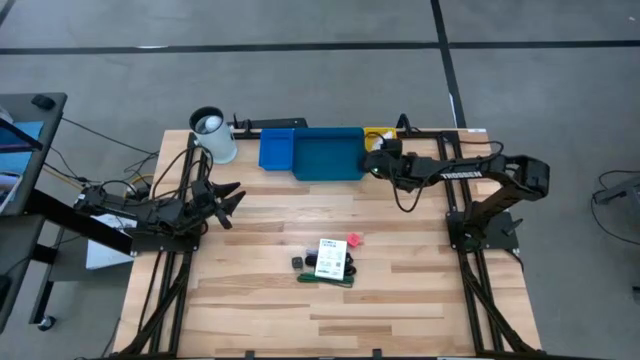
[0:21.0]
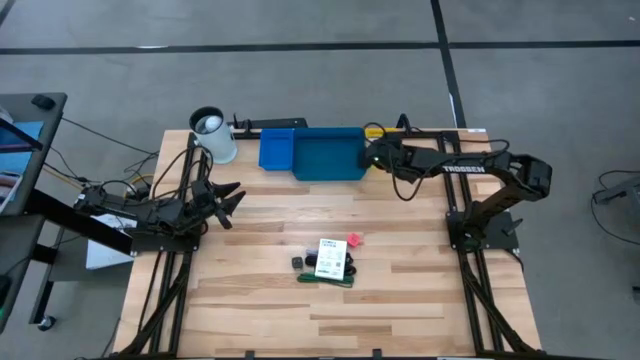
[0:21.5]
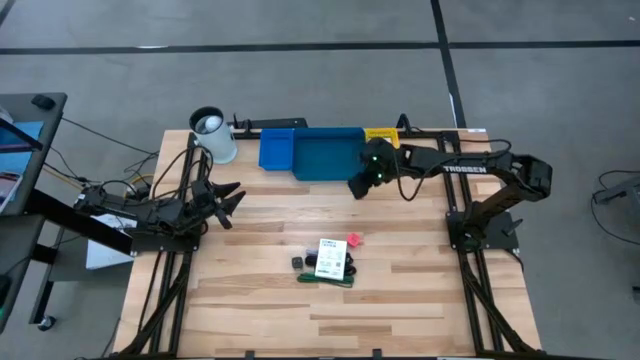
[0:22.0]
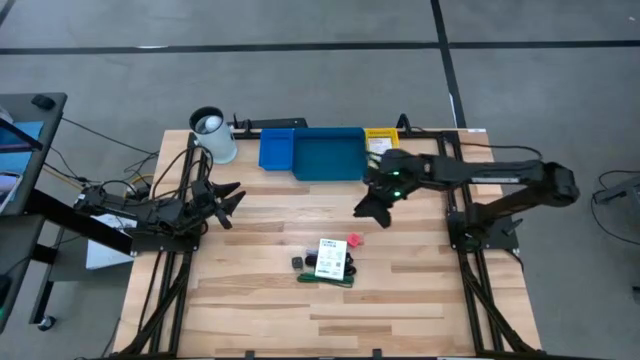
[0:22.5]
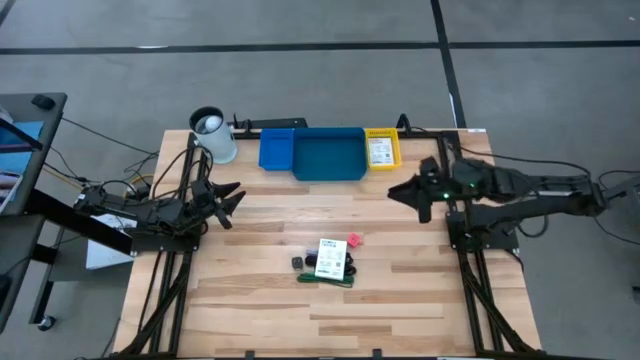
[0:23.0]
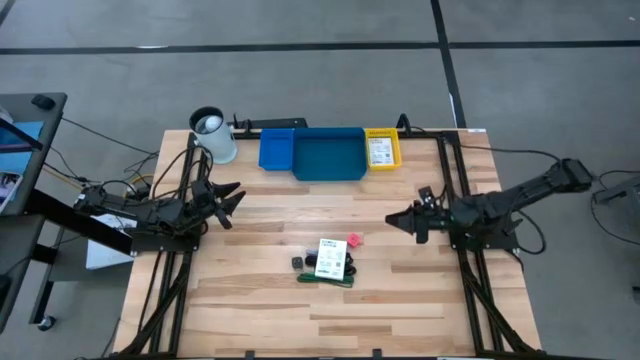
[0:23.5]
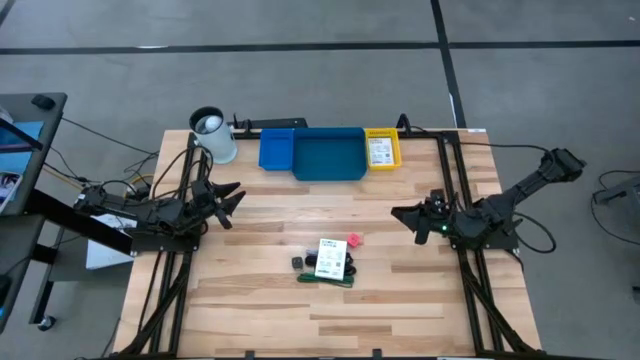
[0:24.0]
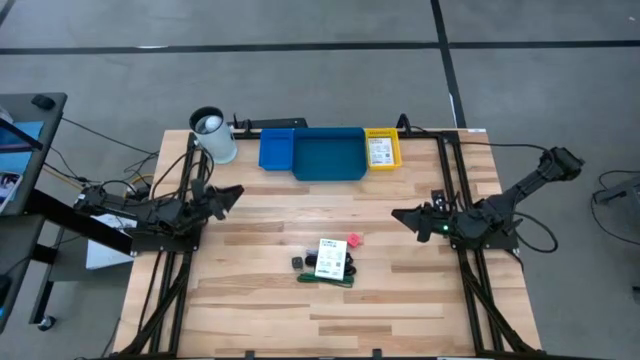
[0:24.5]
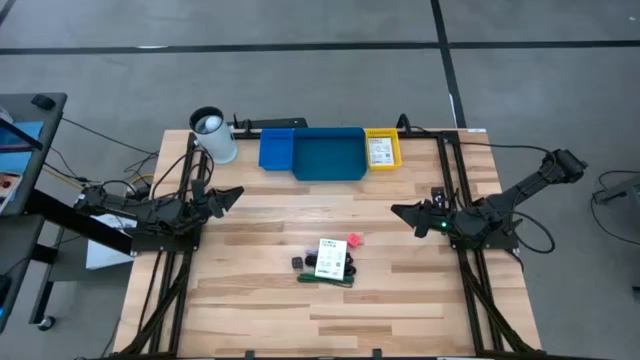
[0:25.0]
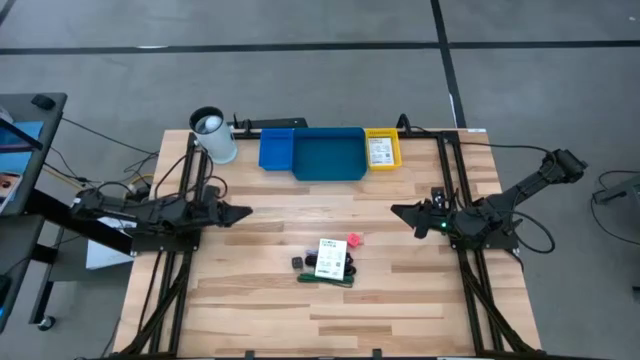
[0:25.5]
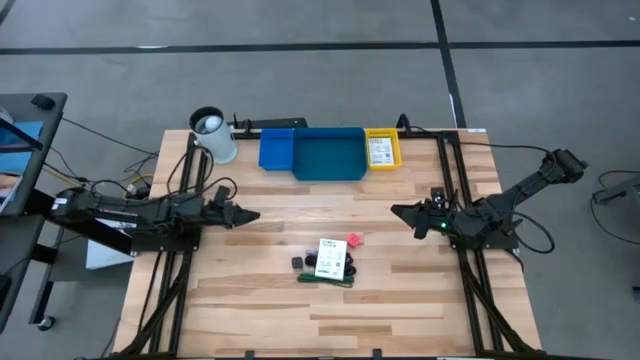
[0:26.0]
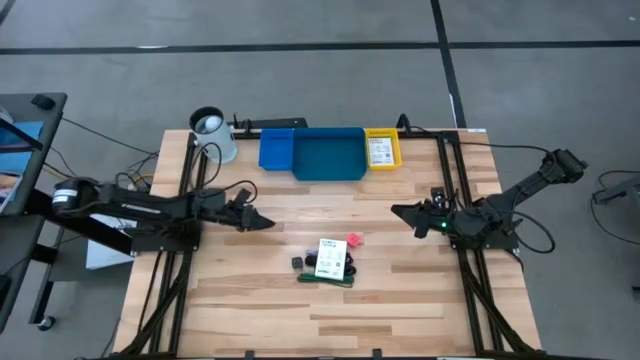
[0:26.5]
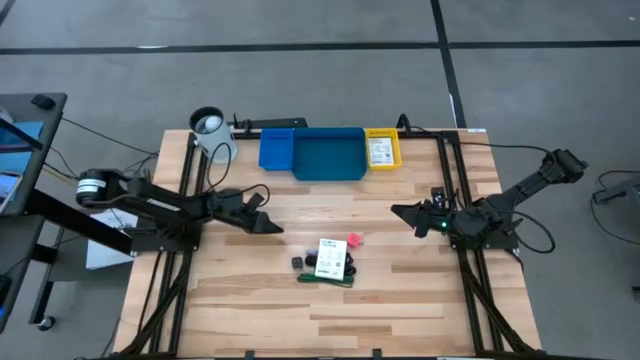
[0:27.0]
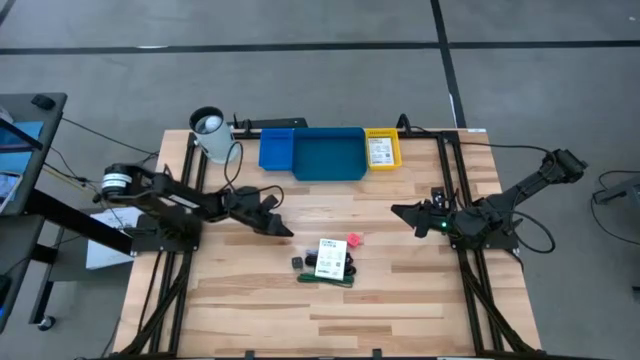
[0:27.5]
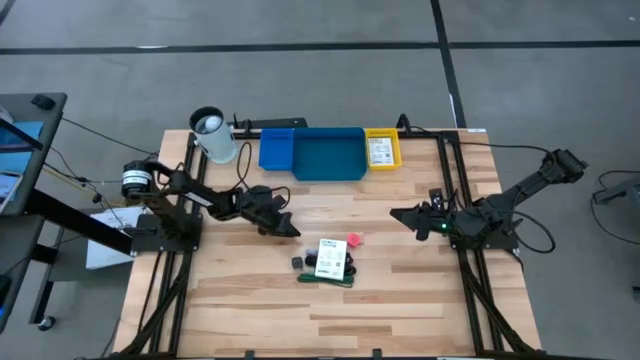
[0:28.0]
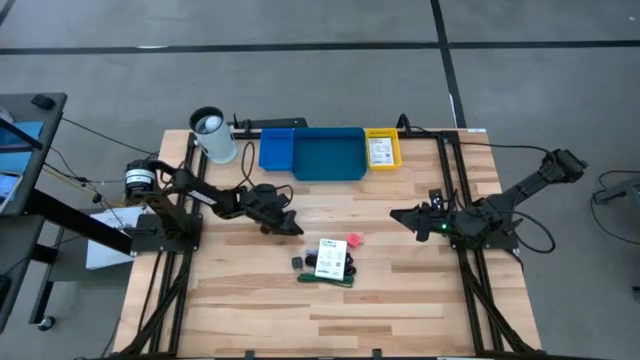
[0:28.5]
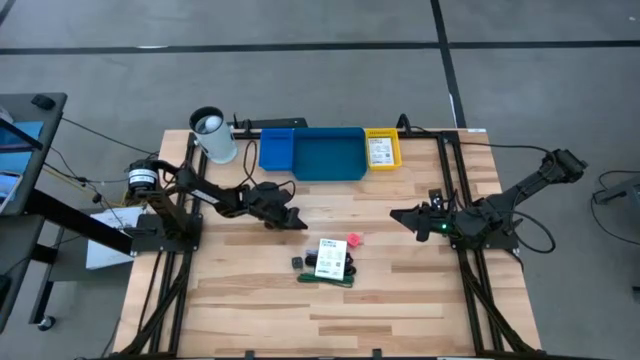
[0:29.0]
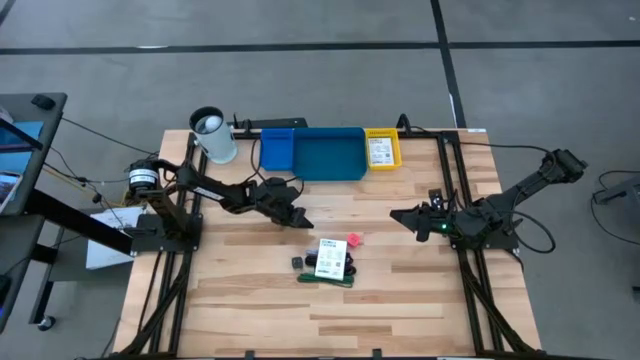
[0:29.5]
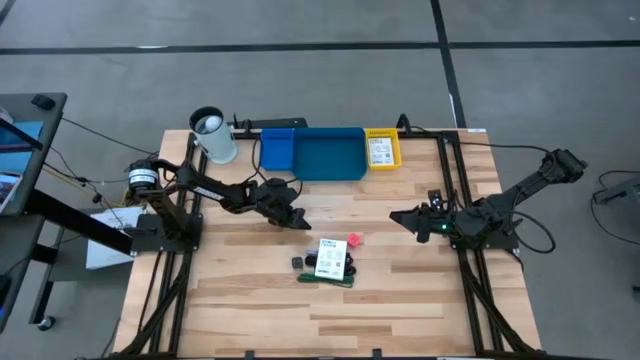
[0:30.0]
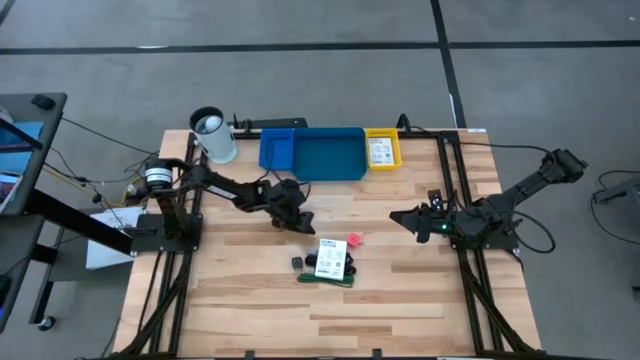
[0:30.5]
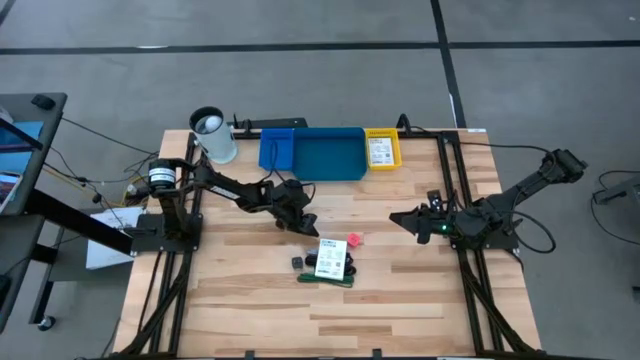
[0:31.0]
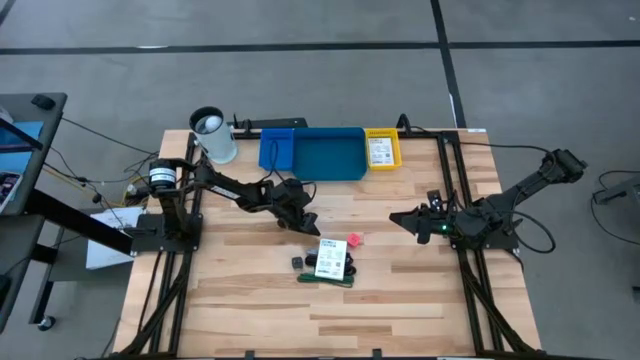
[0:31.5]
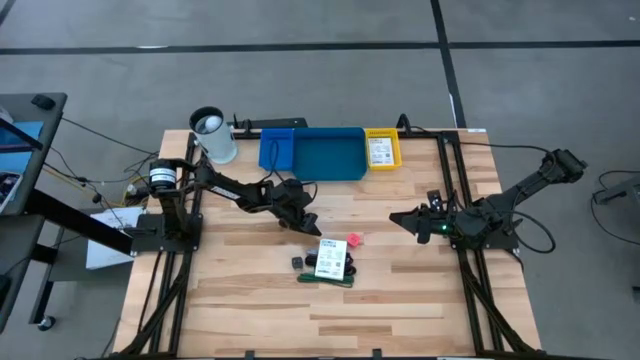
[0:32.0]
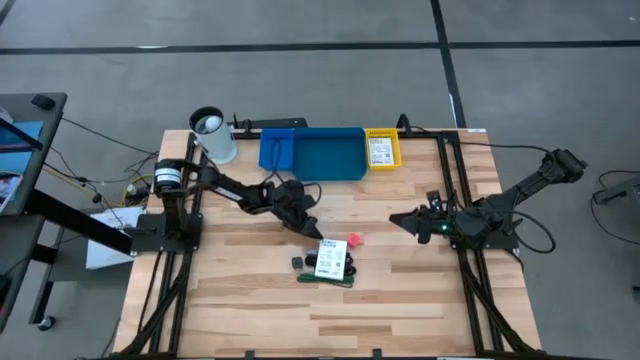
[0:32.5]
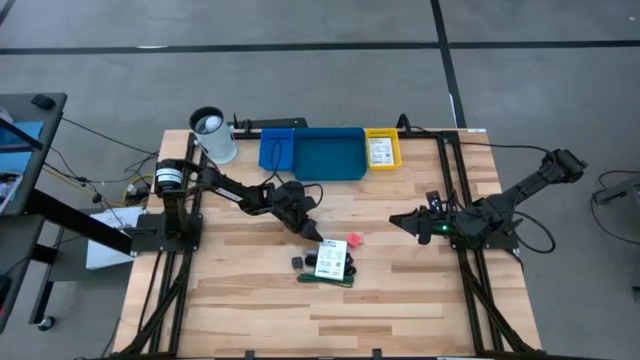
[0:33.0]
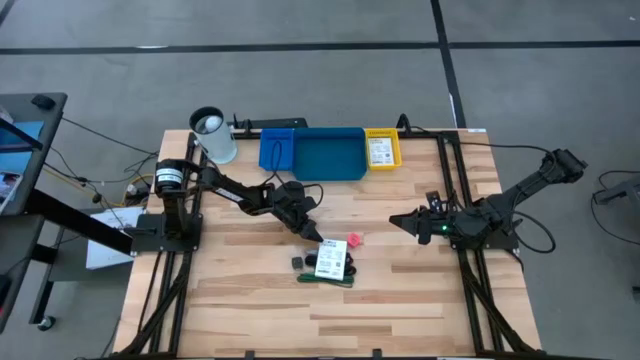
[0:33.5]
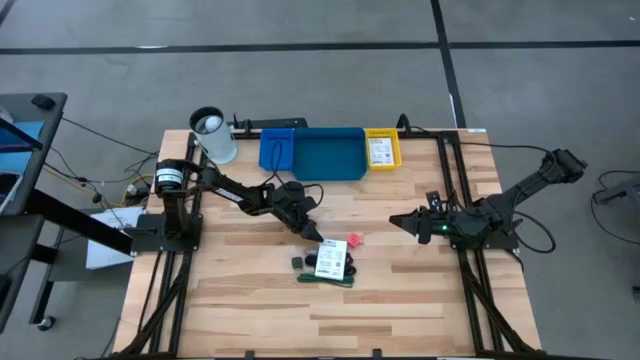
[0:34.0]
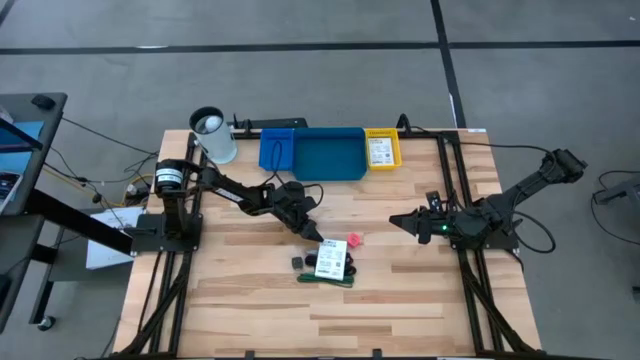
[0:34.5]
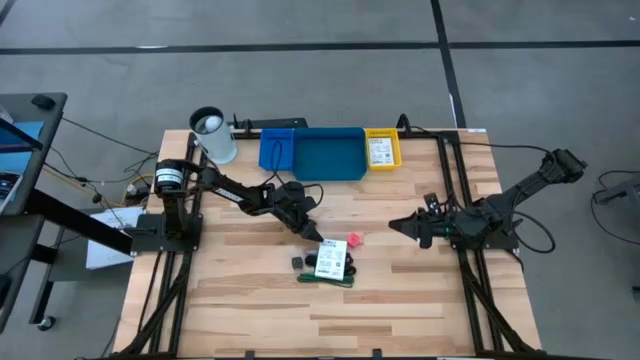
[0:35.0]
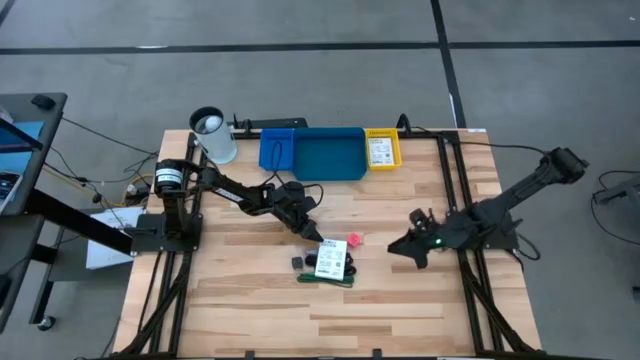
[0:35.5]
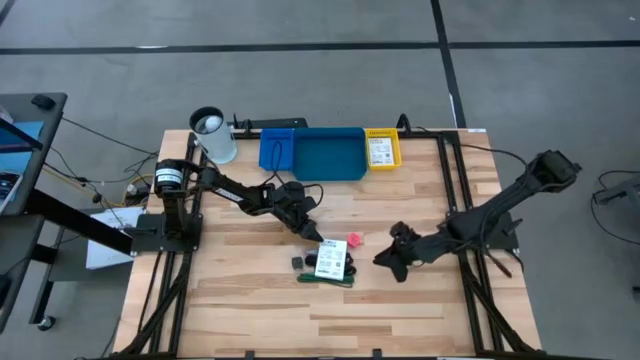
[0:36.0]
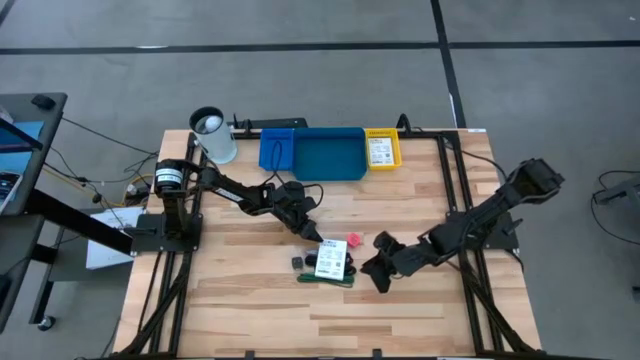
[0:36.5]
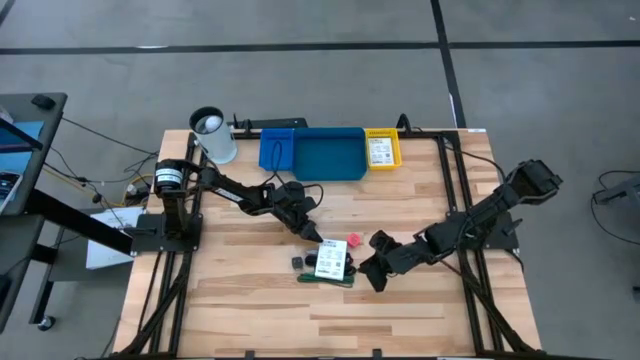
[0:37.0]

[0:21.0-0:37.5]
Task: Pick and place items into bin
Put the white card reader box into the yellow bin

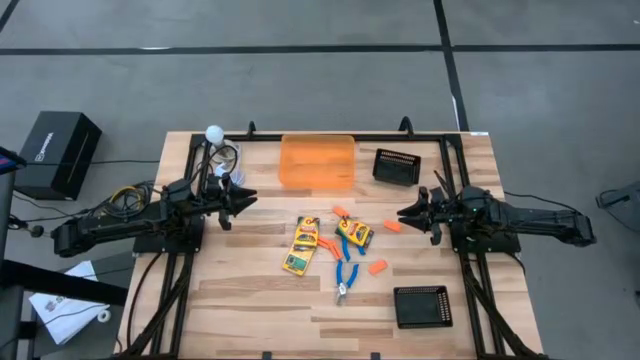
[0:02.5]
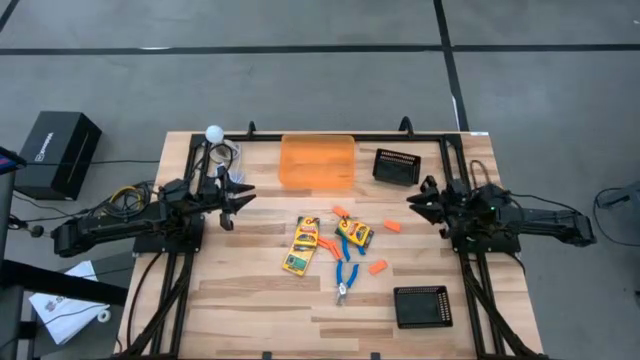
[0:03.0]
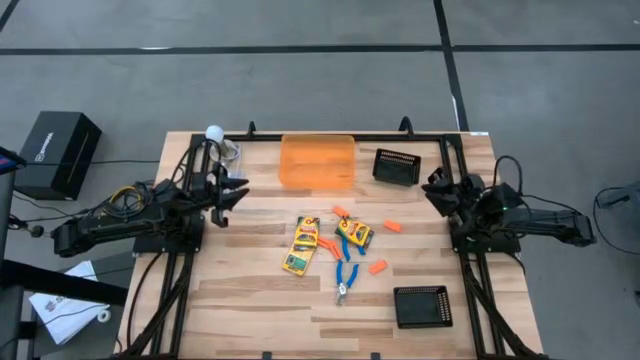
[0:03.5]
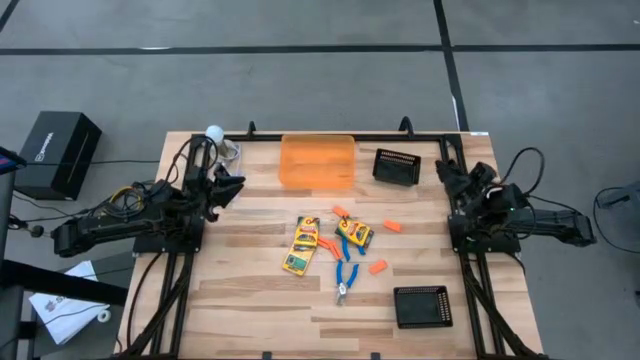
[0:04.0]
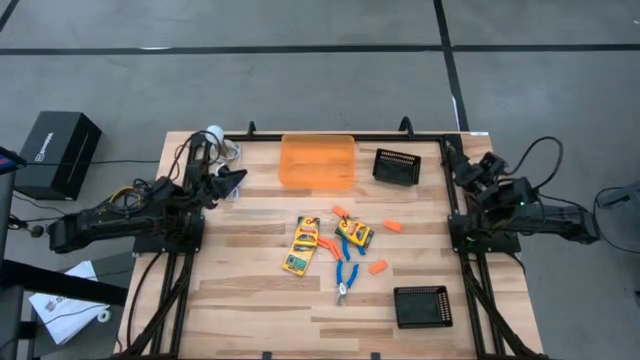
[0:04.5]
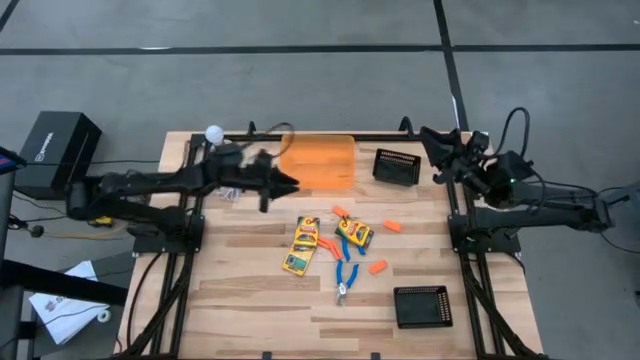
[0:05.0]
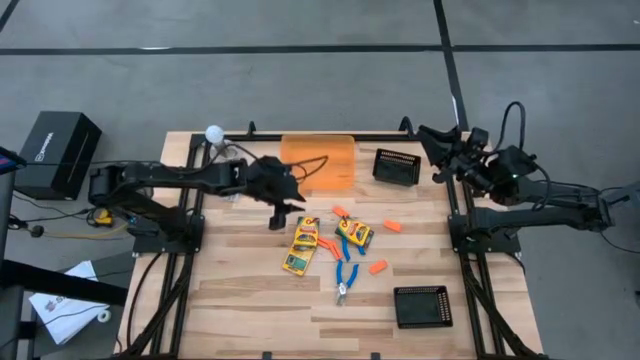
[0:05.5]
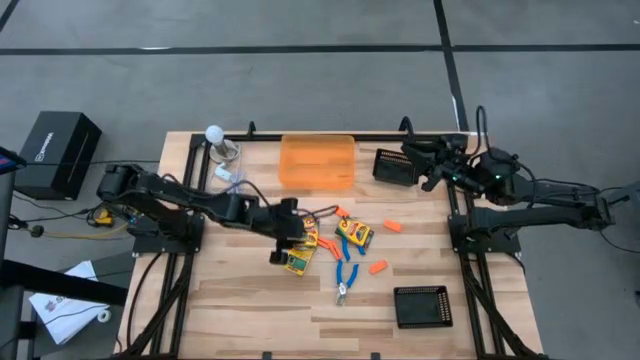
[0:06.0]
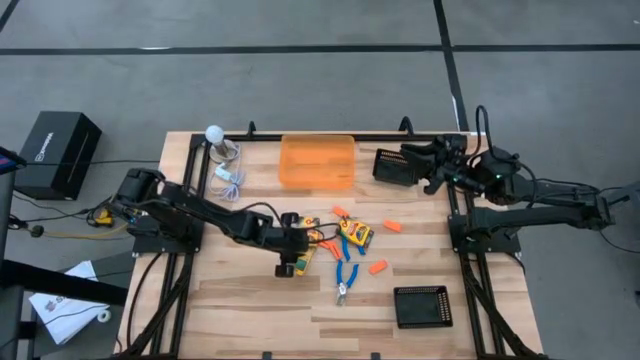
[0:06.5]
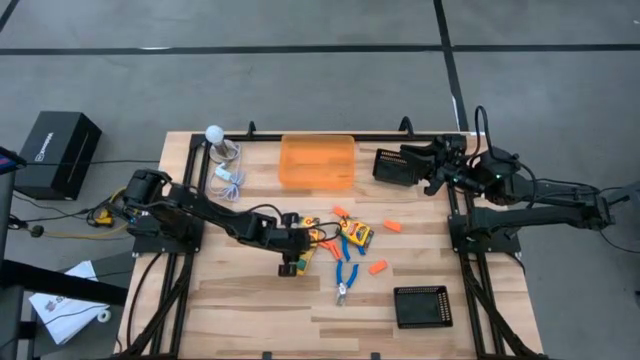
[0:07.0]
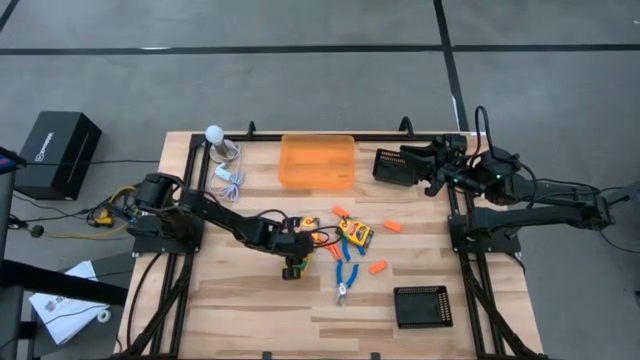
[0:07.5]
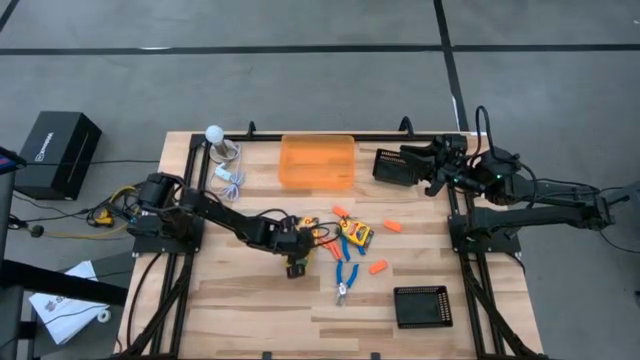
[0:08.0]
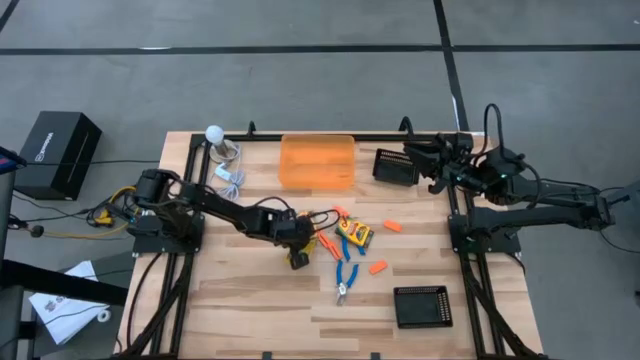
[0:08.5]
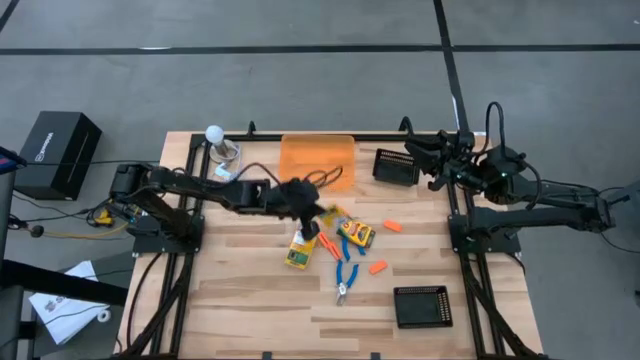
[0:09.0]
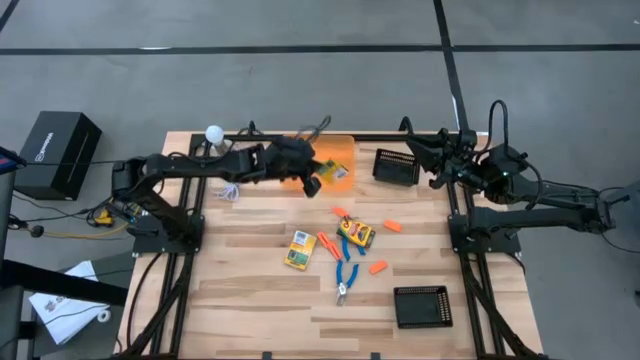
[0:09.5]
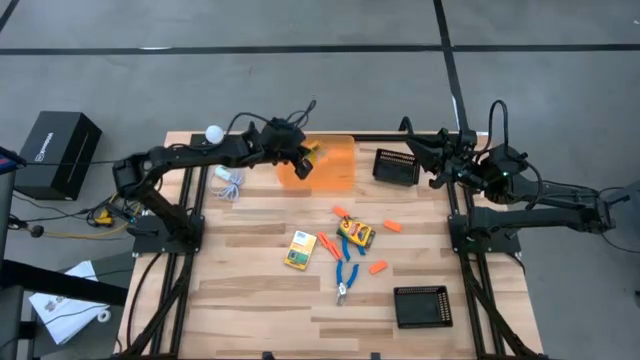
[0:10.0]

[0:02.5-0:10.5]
Task: Pick & Place School Supplies
Put the yellow crayon box into the orange bin
